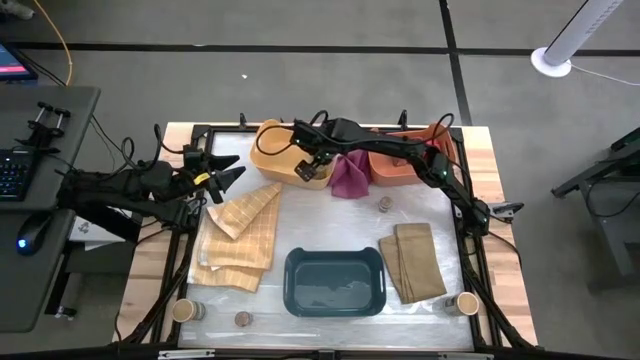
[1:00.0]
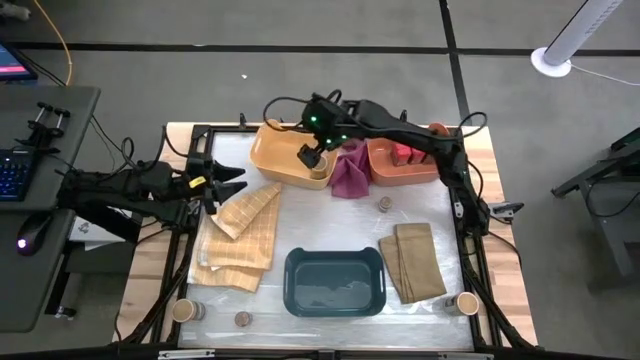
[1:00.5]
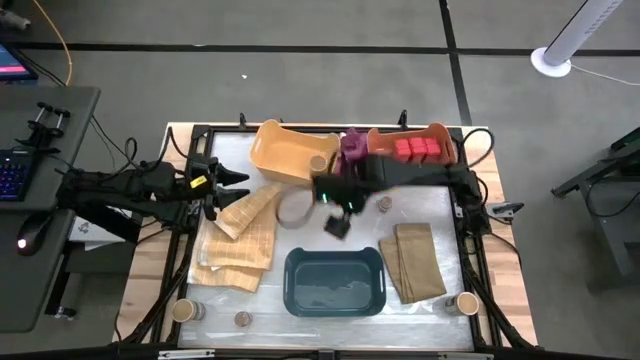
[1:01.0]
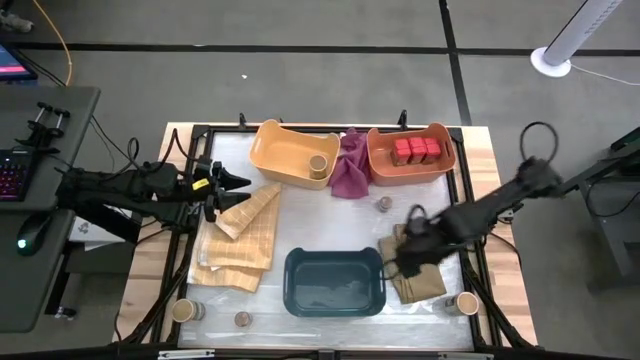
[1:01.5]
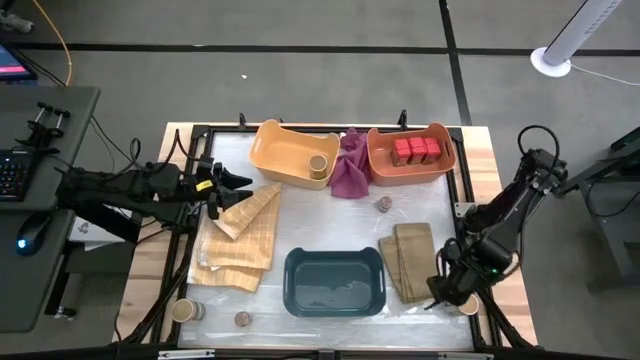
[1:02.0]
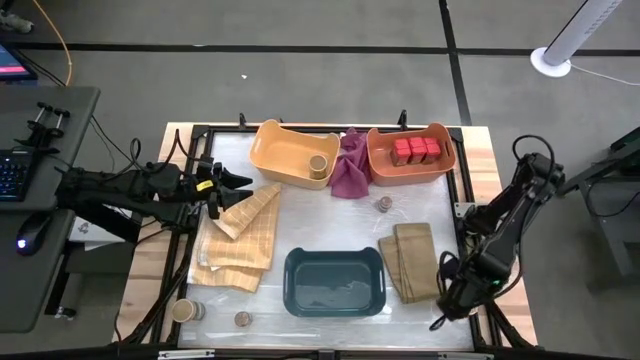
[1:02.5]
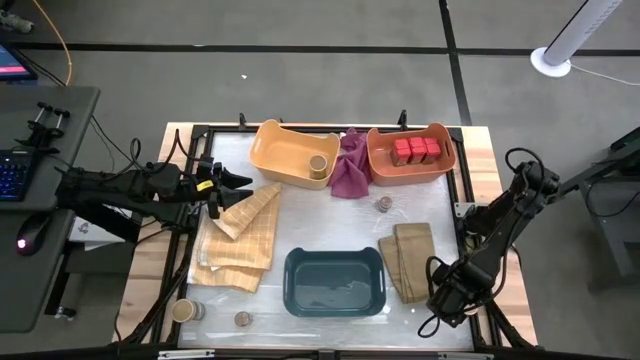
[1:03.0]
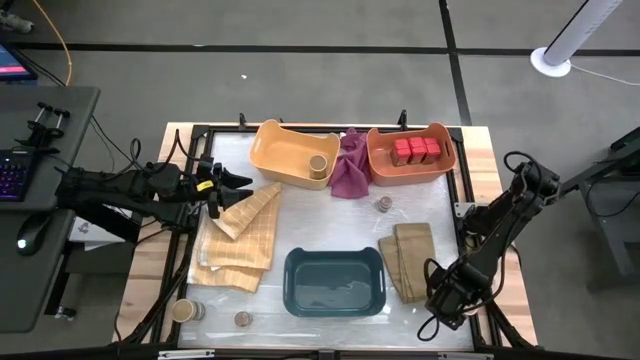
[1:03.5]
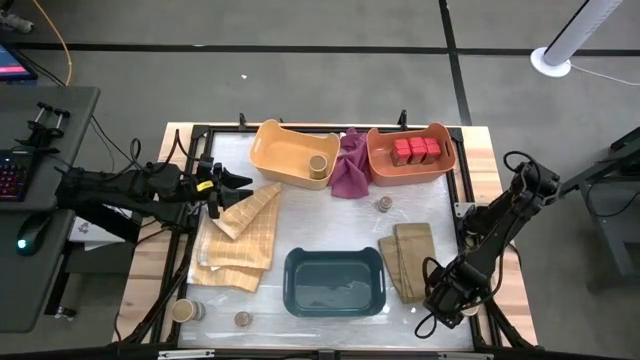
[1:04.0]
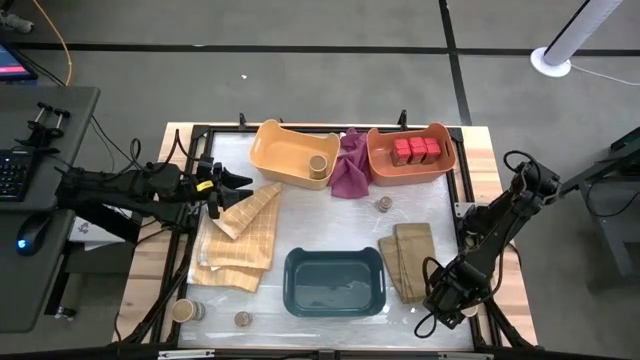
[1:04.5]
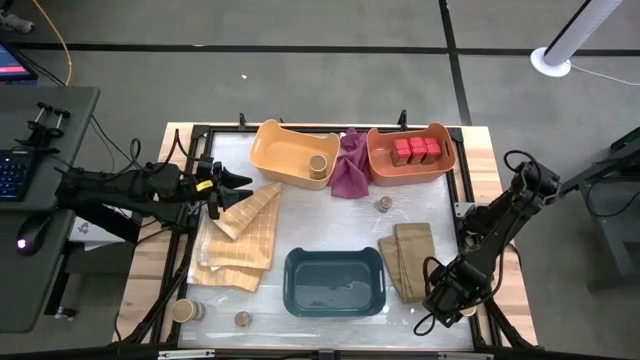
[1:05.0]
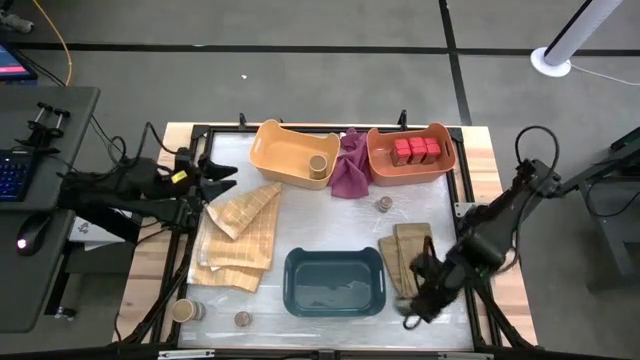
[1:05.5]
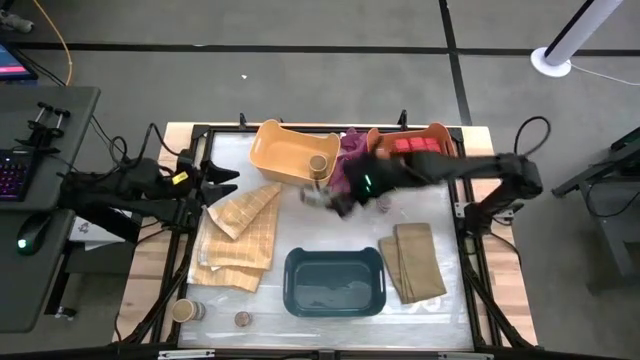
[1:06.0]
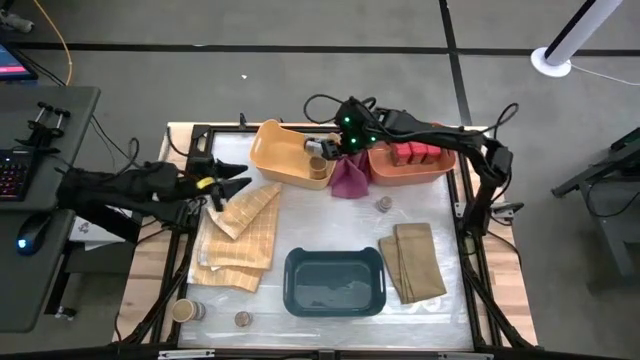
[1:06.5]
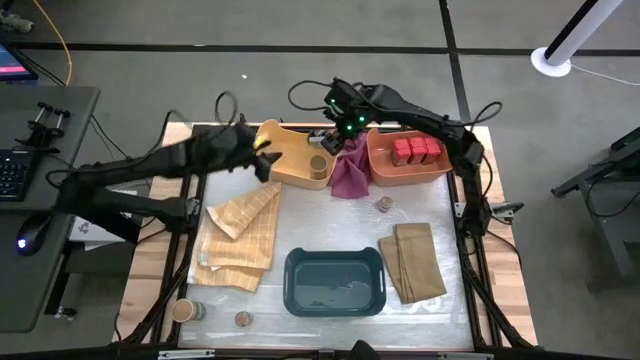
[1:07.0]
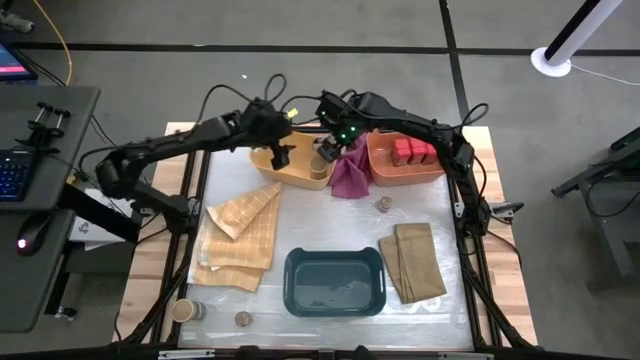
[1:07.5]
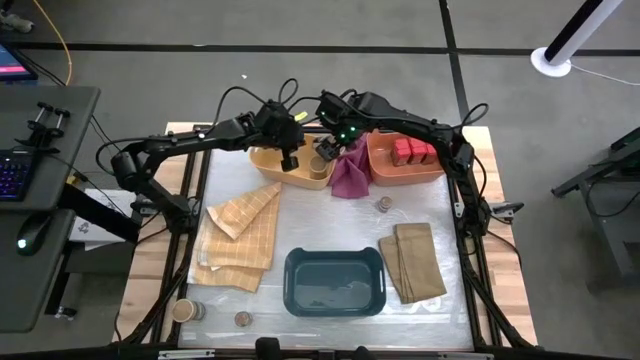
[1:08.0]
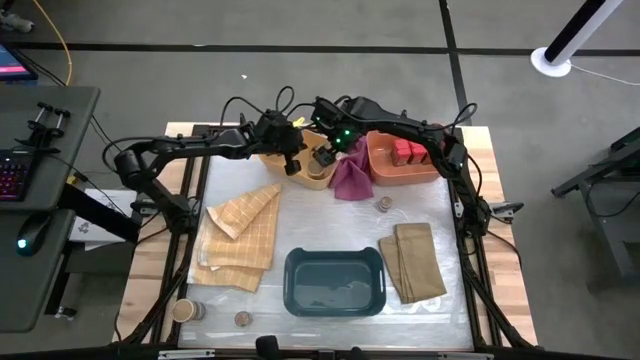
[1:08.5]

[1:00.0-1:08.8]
Task: Sort spices by type
Put the right brown seasoning bottle into the yellow bin

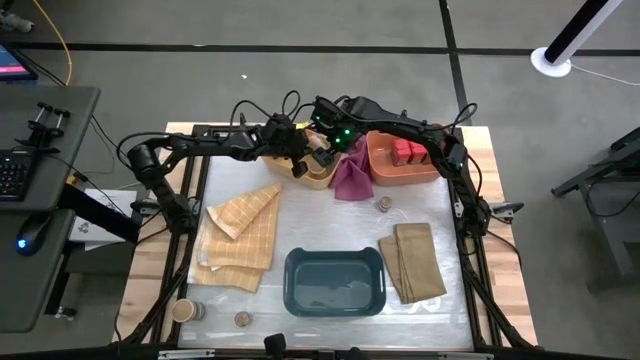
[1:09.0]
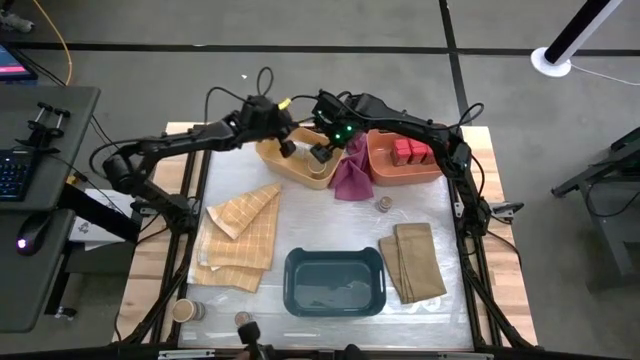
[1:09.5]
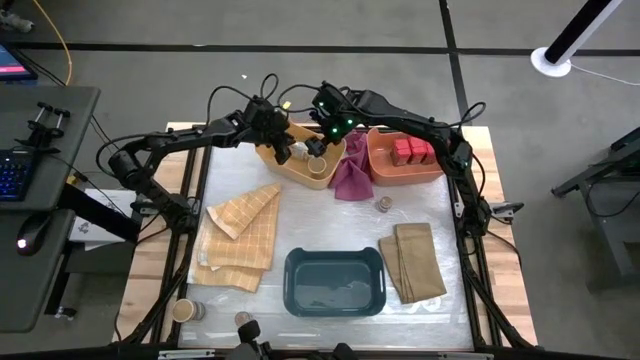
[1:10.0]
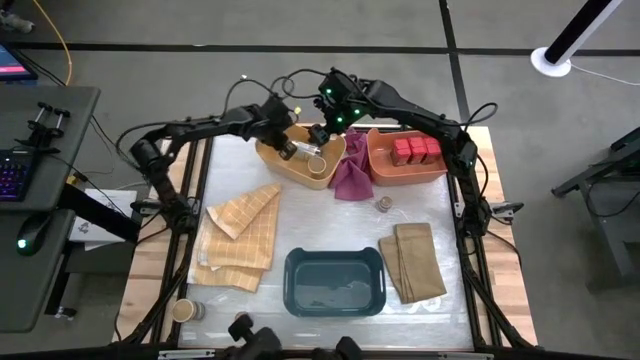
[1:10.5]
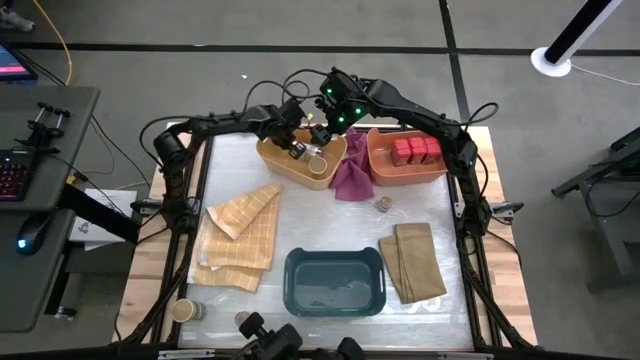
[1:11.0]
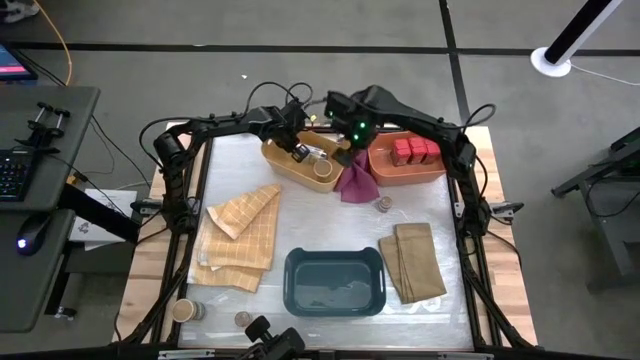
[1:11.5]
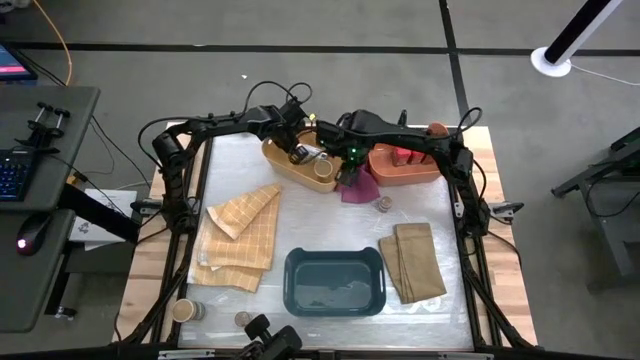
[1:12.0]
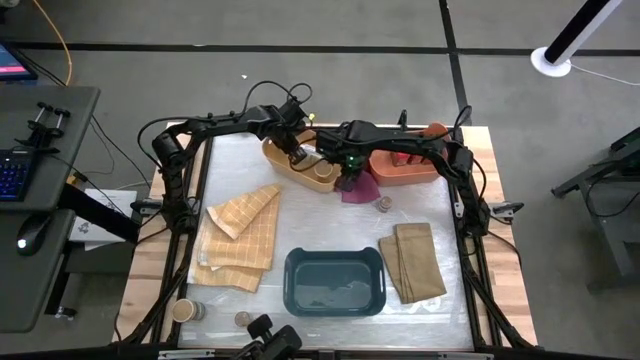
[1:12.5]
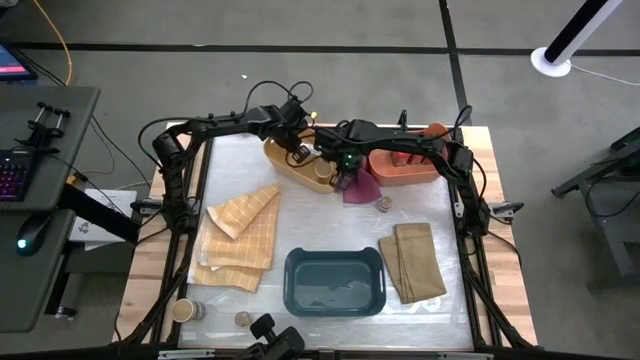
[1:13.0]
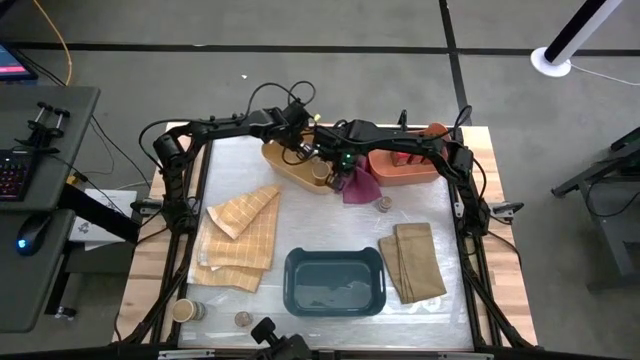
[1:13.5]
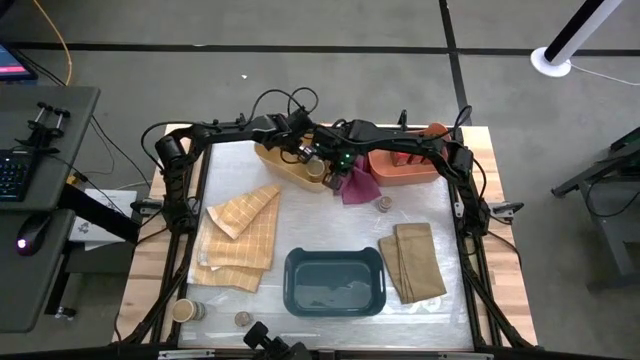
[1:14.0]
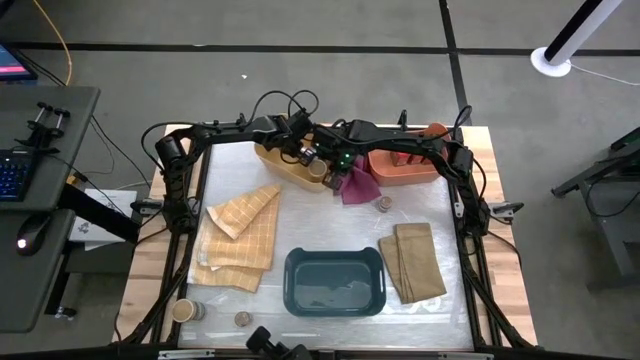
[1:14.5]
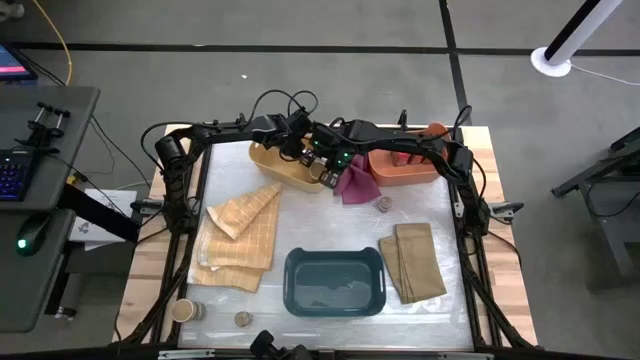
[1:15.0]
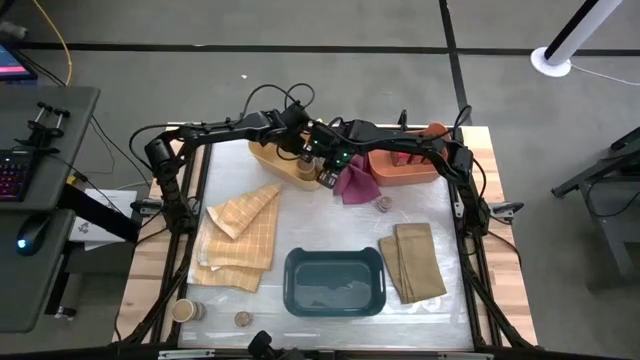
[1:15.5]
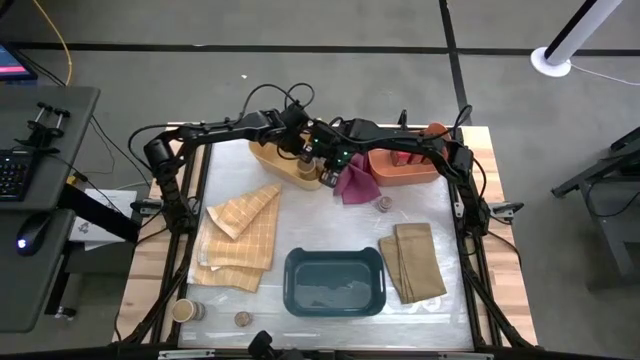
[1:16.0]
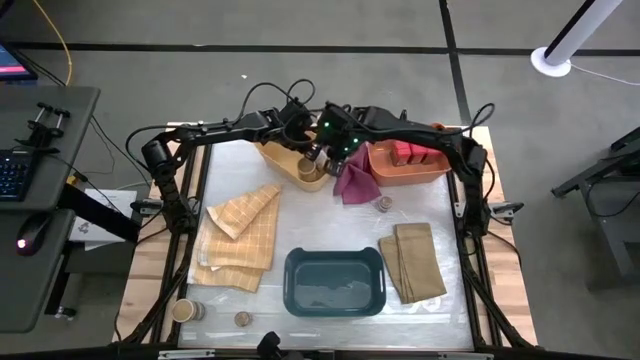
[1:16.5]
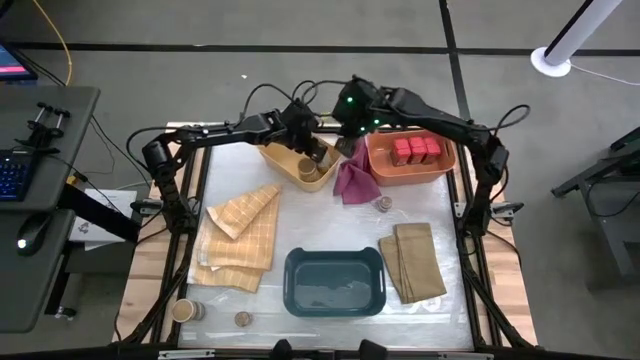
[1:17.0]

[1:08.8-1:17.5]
Put the right brown seasoning bottle into the yellow bin

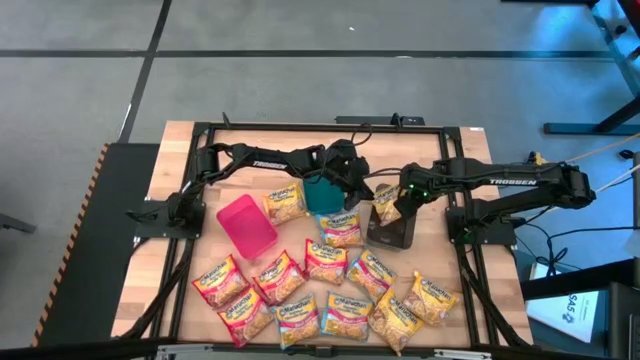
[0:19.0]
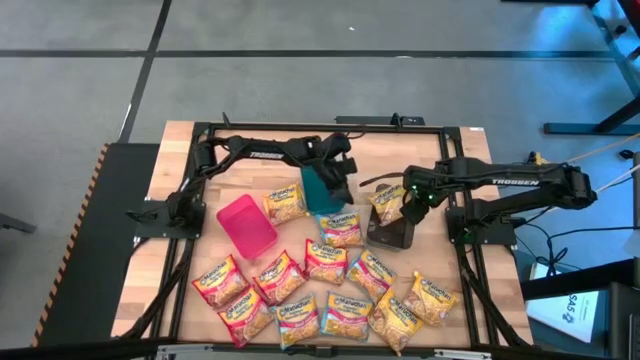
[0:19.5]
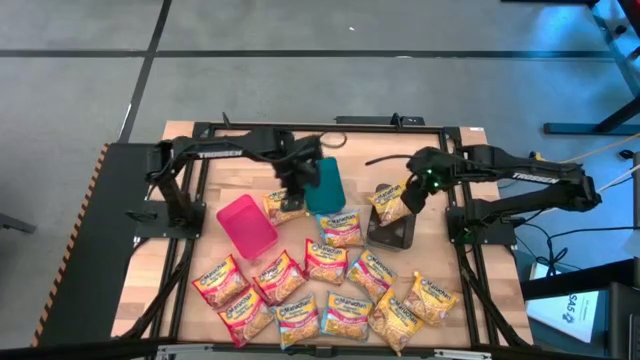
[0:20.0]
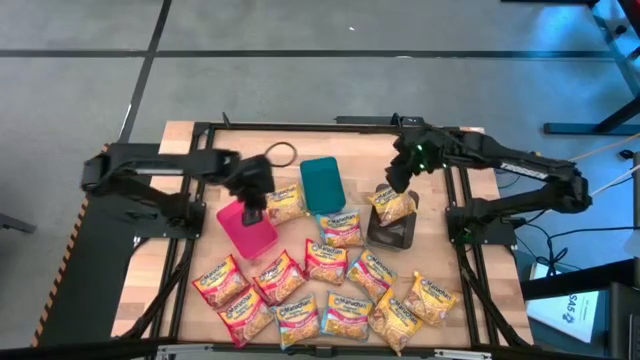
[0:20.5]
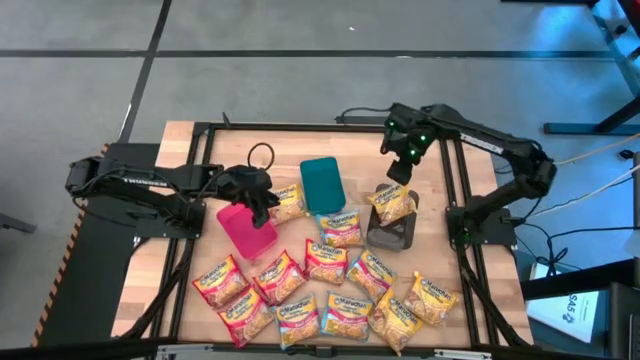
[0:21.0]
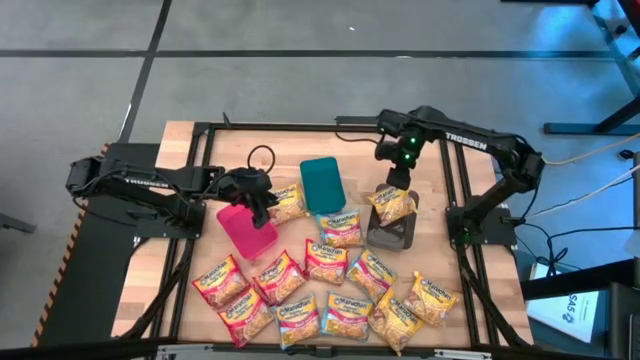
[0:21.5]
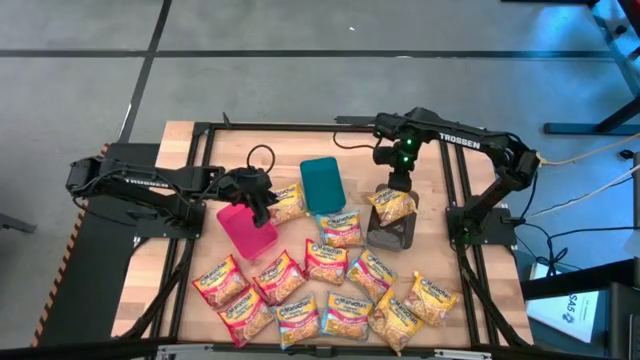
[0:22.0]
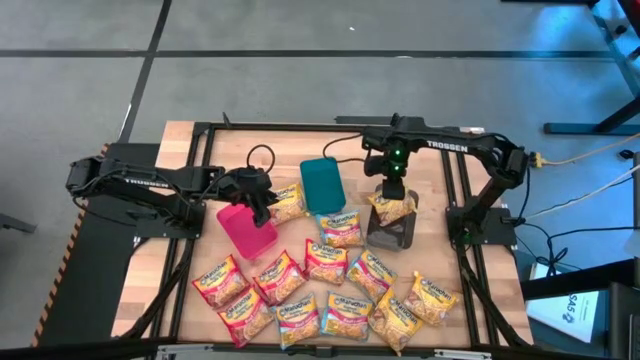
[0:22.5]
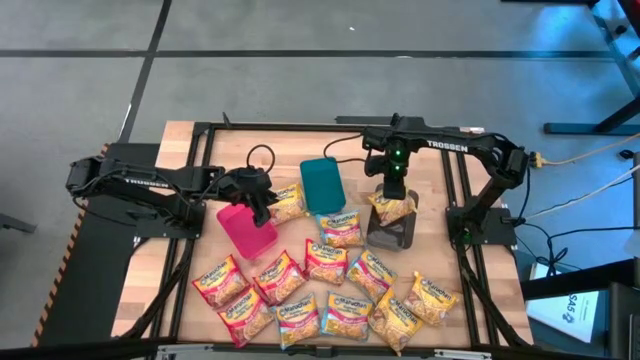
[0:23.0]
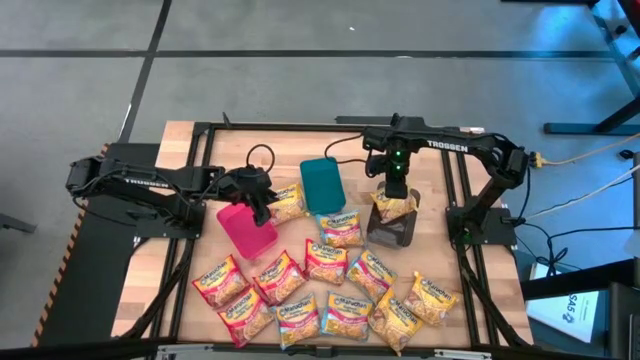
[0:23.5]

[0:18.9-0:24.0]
Task: Sort Maruchan noodles
Put the yellow noodle pack into the black bin
